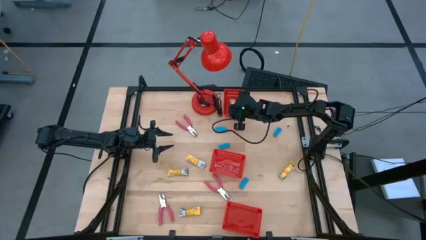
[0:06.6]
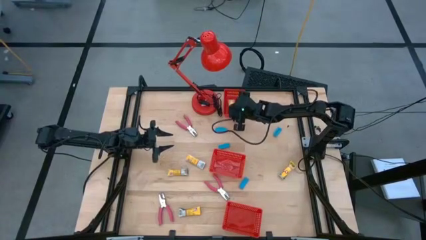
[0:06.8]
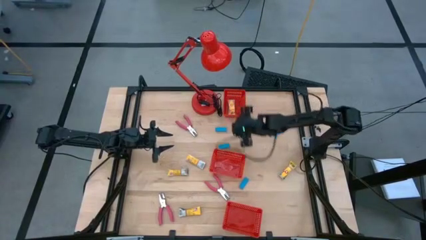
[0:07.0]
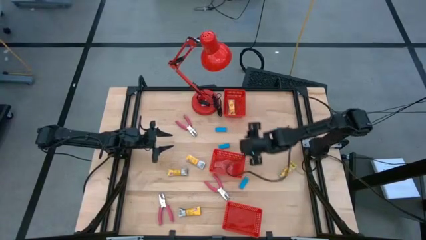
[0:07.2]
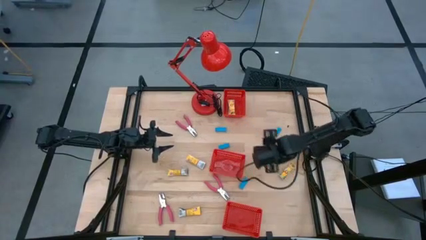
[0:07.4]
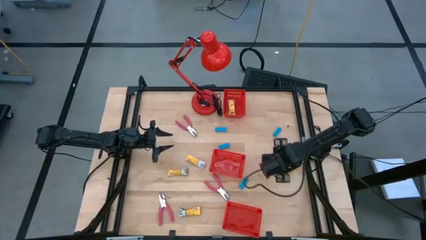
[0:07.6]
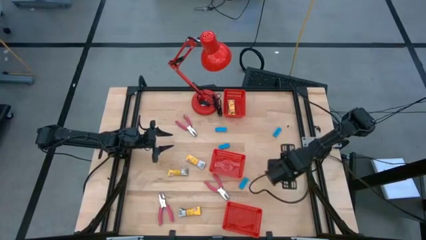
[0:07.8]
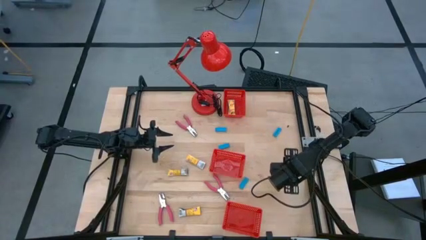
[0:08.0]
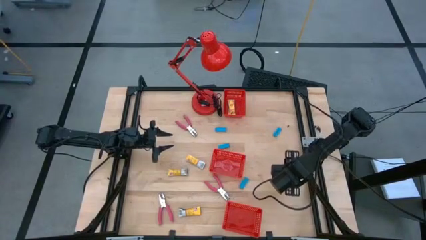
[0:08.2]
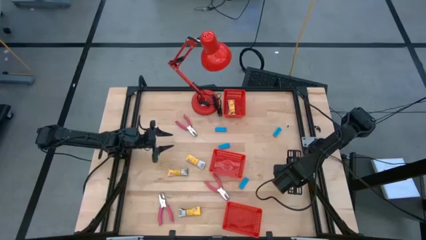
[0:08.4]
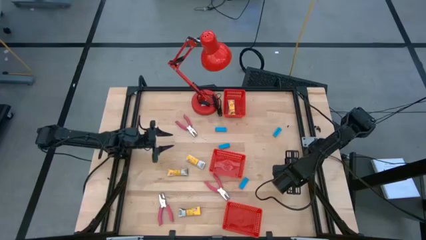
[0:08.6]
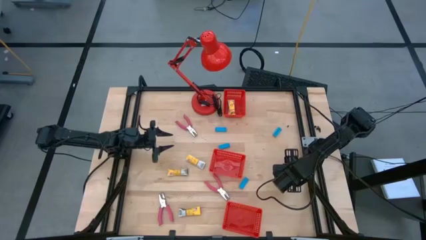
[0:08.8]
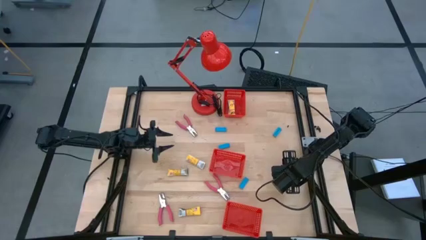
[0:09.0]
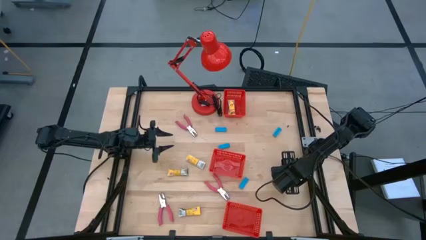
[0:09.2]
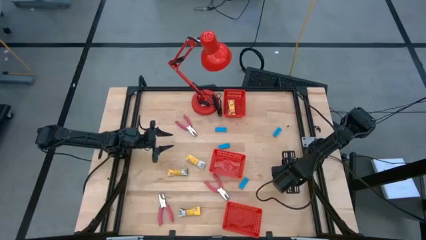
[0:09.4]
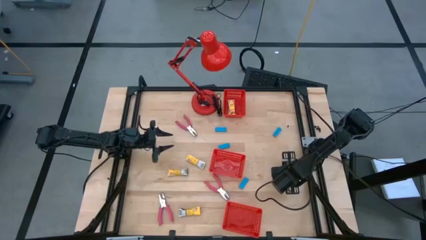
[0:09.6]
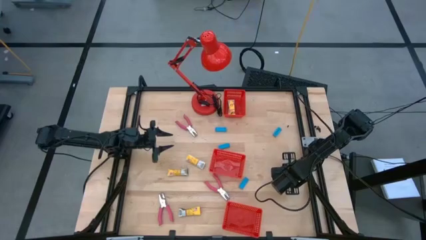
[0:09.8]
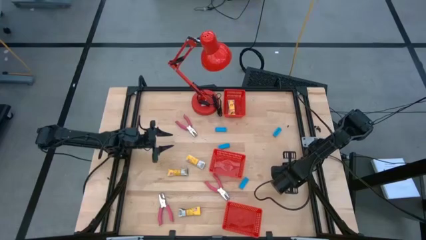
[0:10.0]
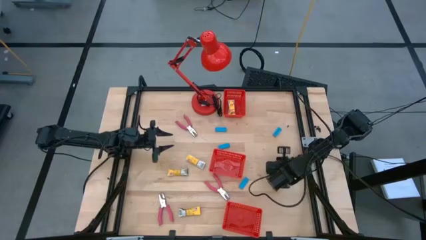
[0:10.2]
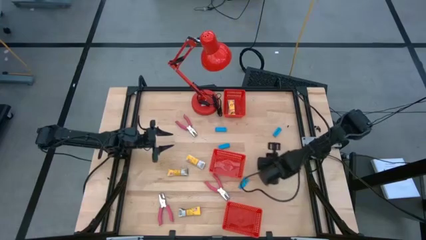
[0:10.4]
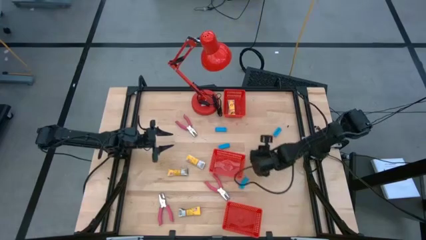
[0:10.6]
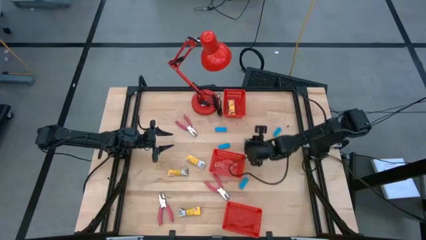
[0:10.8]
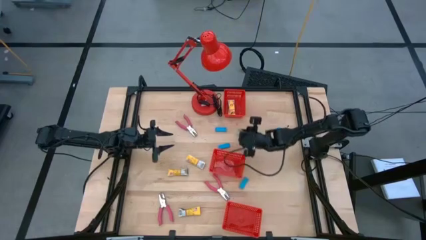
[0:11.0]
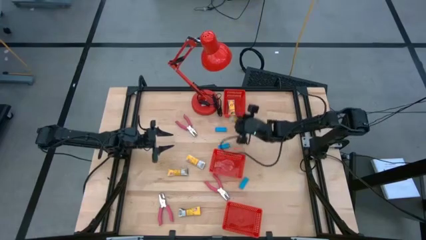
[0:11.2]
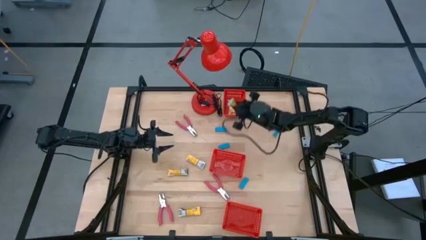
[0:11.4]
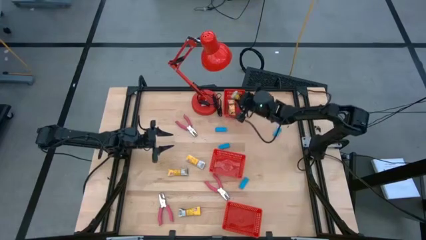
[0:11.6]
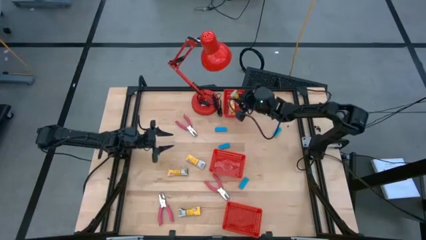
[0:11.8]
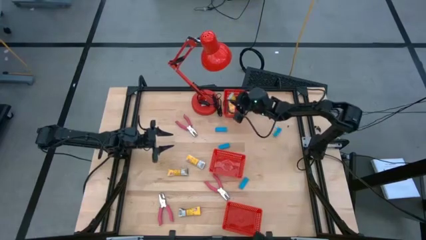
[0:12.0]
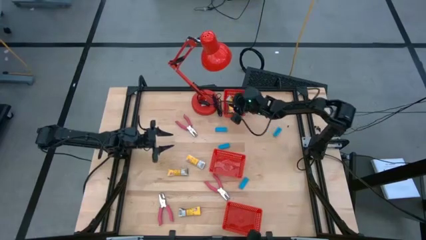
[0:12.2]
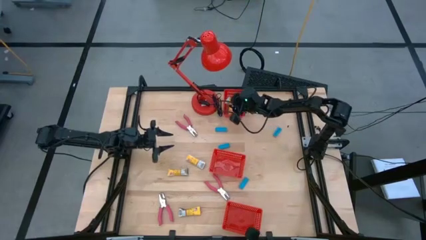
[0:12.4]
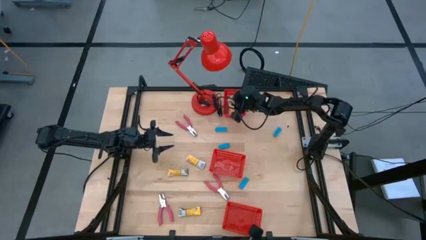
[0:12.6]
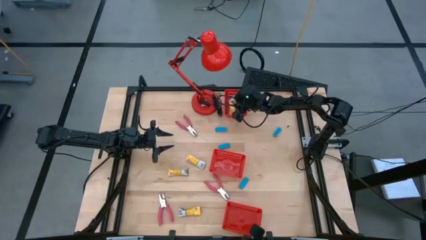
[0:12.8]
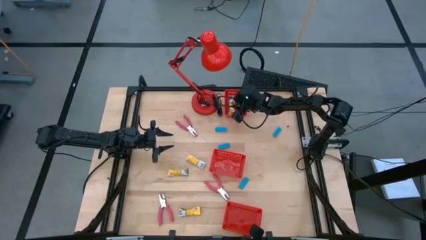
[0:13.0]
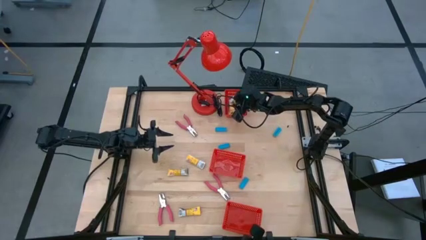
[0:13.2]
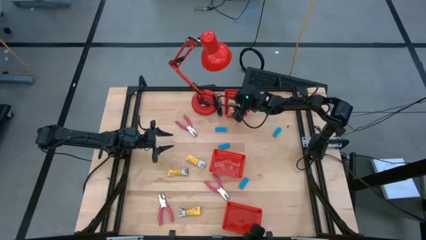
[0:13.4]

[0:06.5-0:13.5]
Task: Pick & Place School Supplies
Put the yellow crayon pack into the top red basket

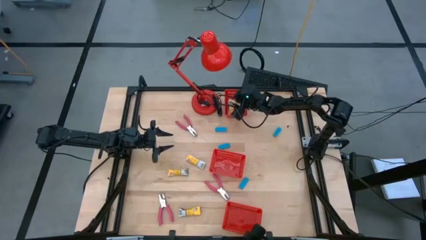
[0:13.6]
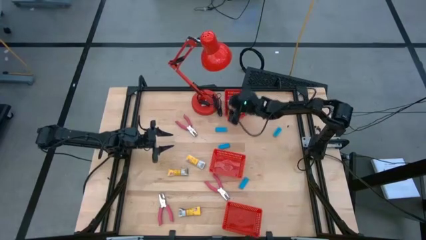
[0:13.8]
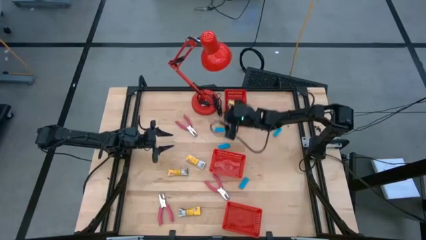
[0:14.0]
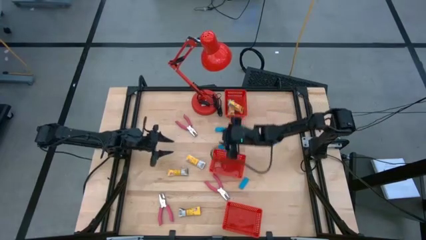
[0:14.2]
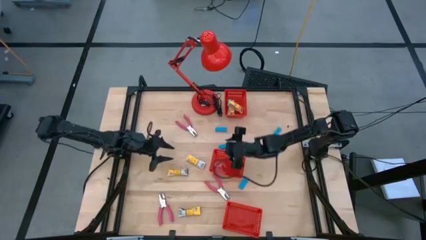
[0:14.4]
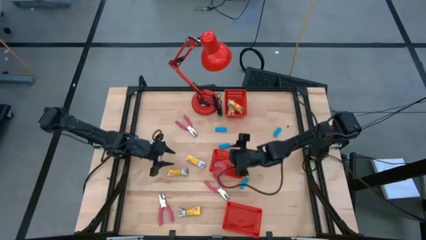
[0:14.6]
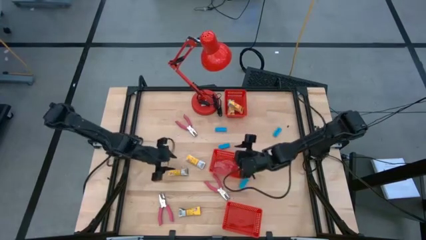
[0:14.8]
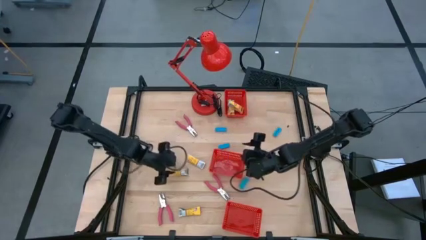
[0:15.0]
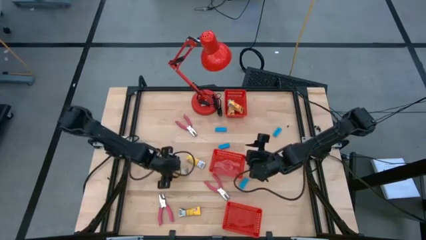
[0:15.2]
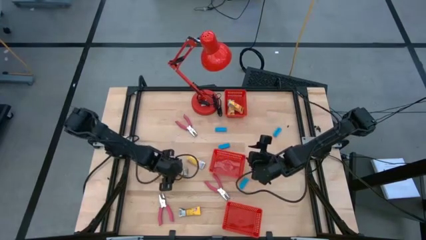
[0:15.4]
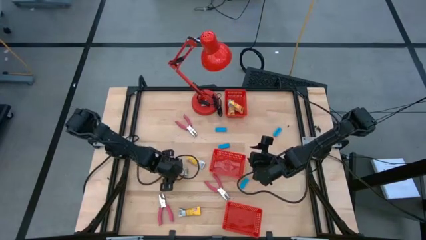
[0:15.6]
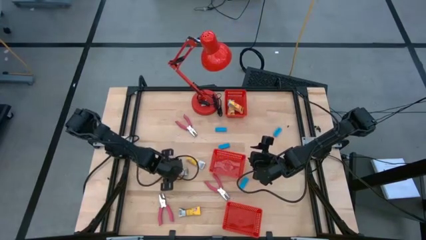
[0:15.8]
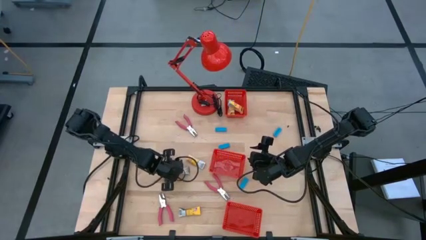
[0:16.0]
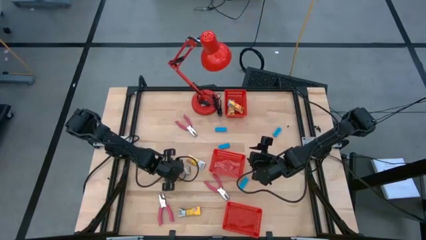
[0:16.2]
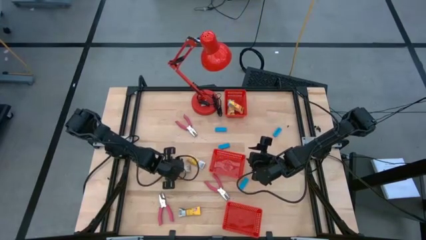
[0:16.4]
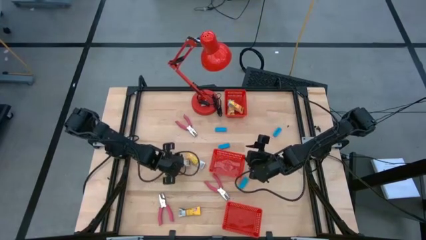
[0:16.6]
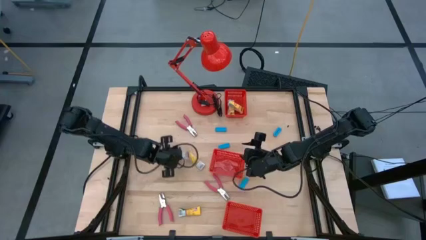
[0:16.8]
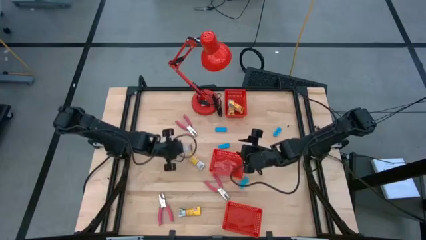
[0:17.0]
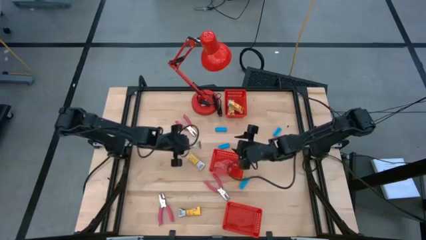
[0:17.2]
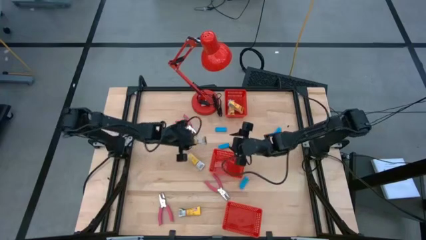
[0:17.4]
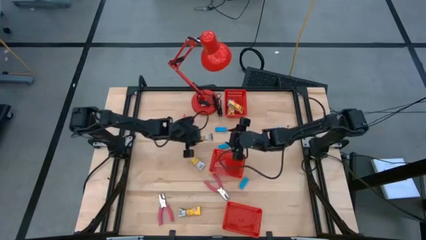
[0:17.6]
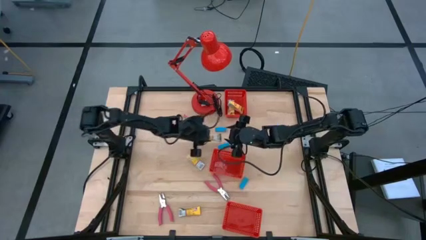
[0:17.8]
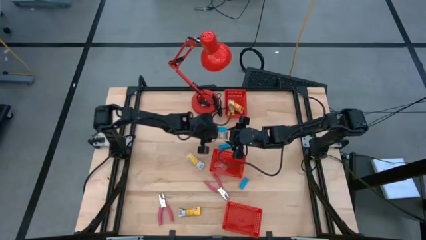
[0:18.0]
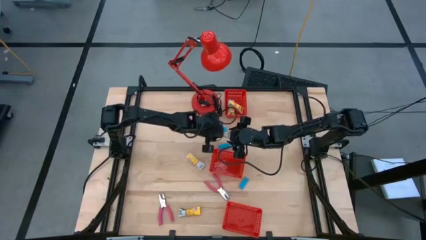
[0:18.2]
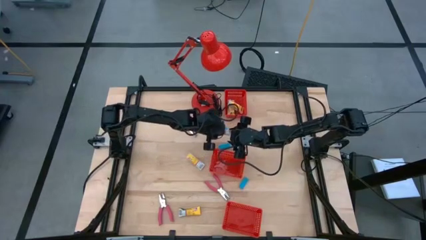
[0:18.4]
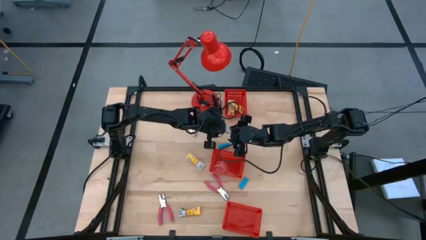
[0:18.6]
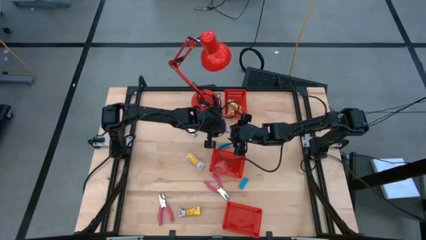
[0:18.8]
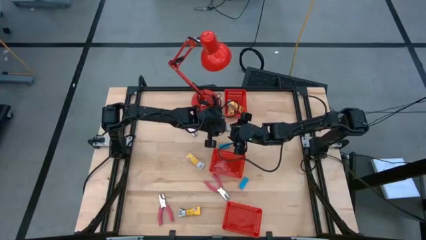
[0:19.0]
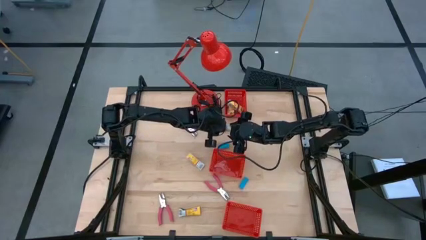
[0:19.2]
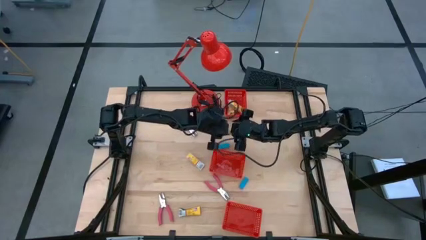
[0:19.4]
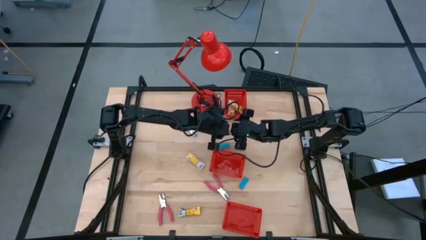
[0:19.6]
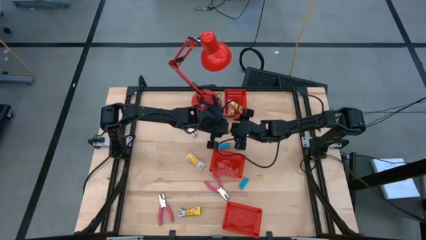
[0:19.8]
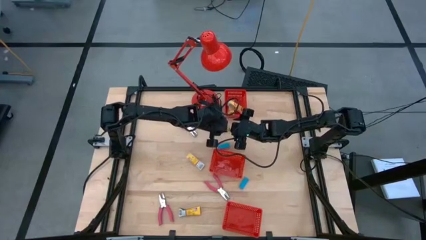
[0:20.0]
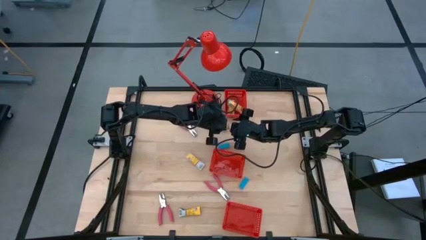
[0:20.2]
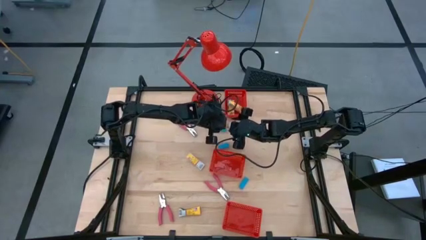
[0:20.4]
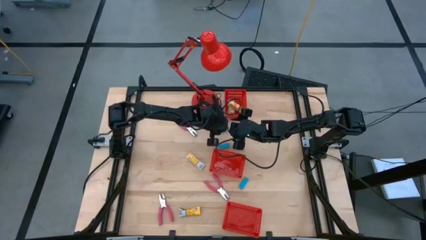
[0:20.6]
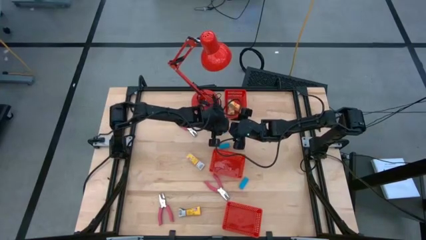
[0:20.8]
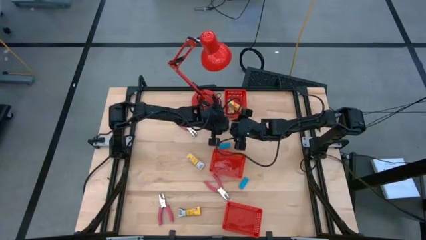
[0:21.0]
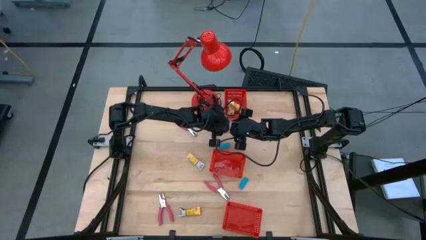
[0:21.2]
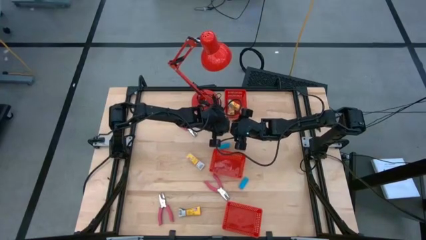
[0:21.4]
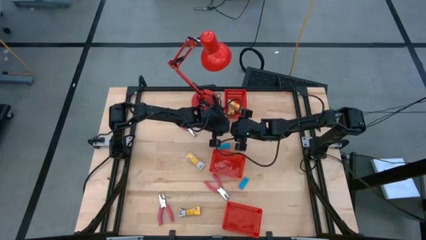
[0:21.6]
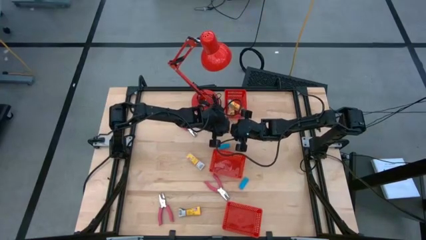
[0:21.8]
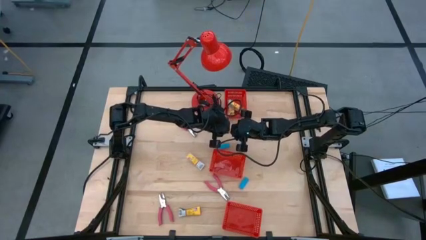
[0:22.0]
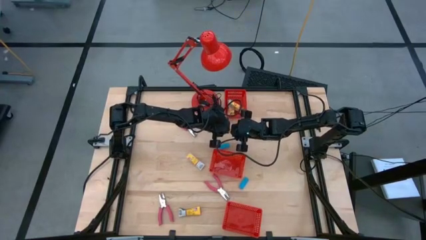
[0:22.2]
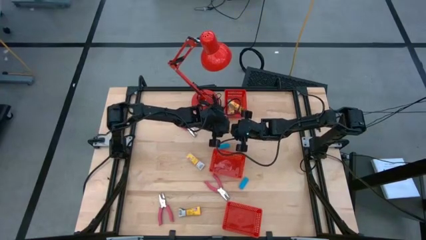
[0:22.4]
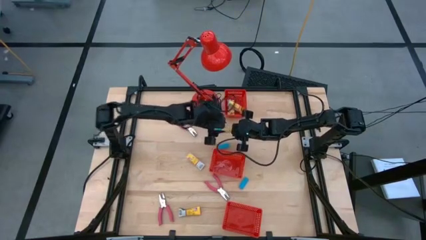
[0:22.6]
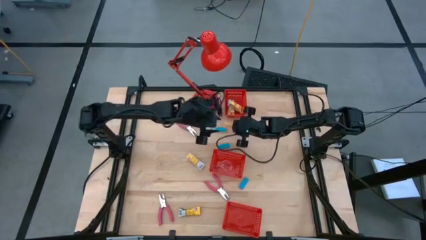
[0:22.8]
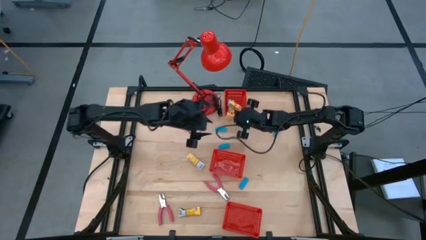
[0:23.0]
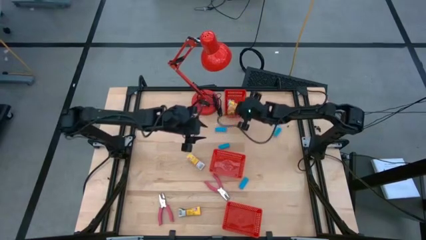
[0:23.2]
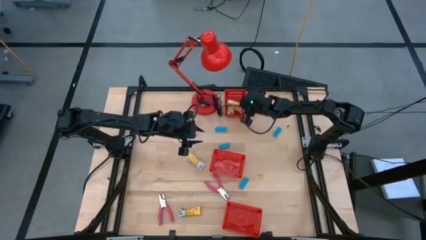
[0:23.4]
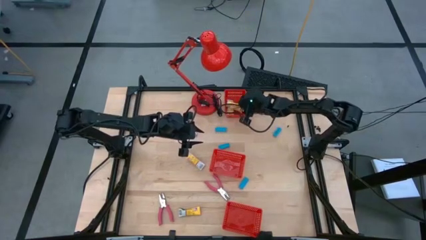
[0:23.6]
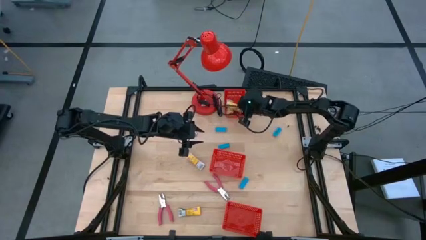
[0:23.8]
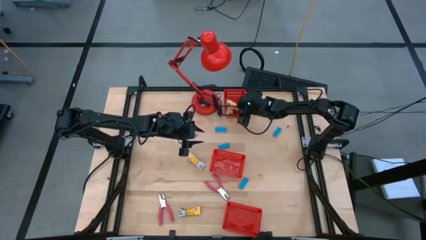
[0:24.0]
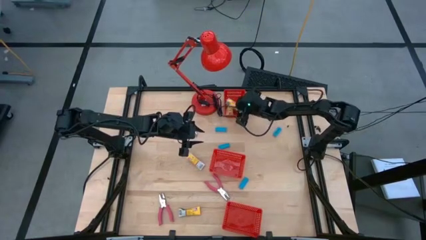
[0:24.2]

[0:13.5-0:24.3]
Put the yellow crayon pack into the top red basket
